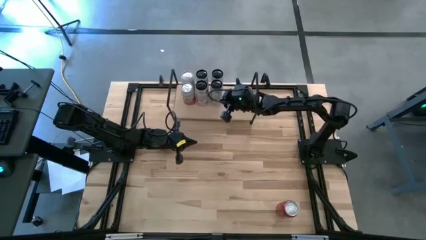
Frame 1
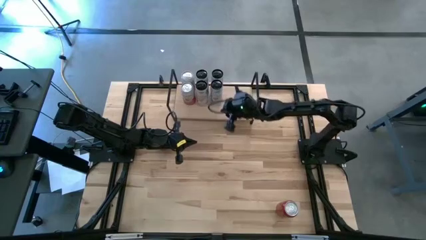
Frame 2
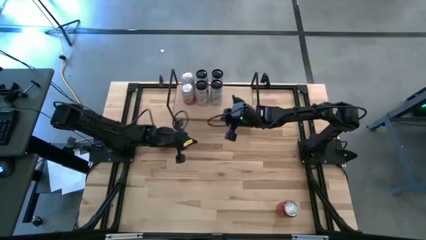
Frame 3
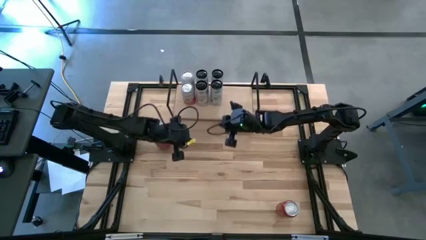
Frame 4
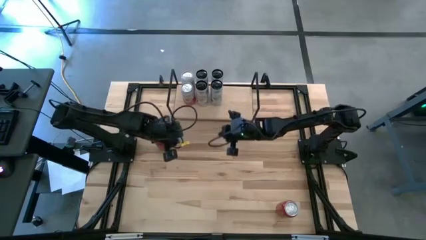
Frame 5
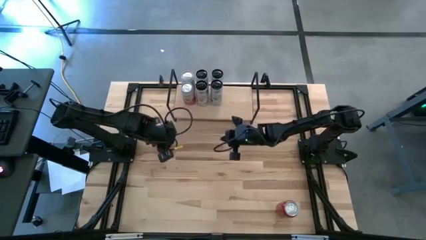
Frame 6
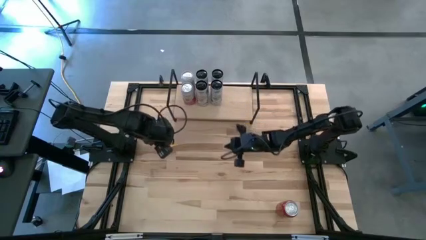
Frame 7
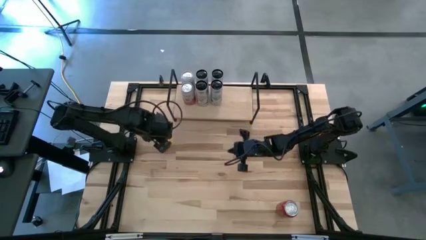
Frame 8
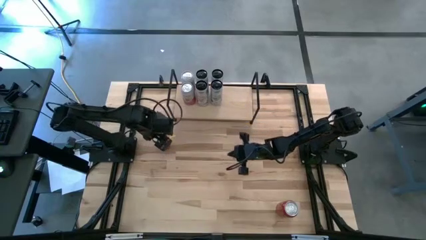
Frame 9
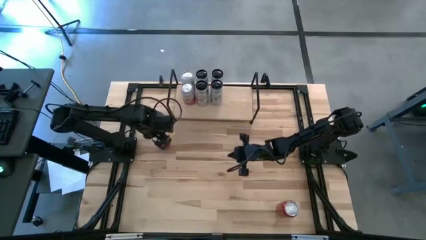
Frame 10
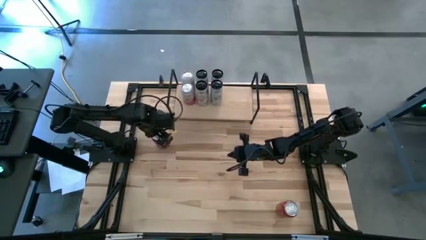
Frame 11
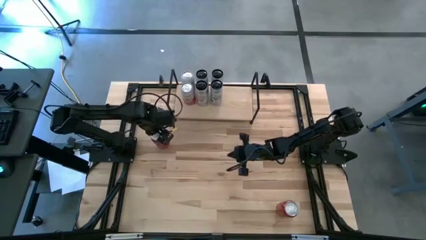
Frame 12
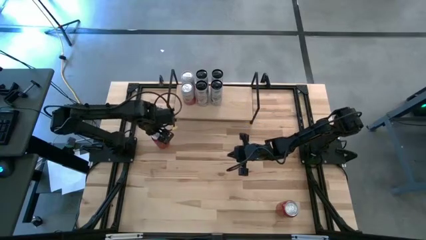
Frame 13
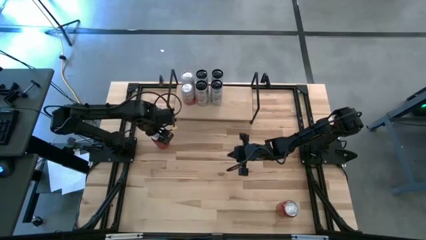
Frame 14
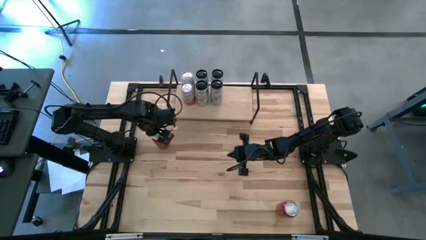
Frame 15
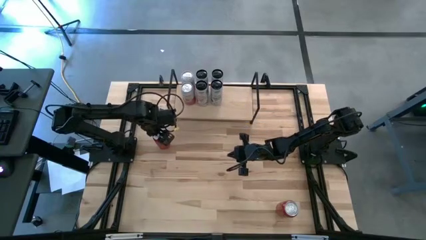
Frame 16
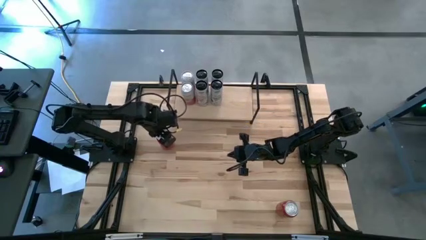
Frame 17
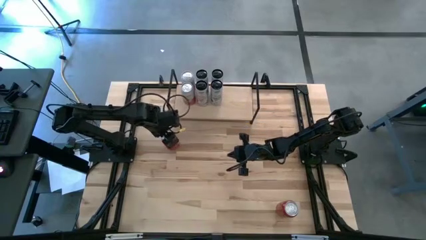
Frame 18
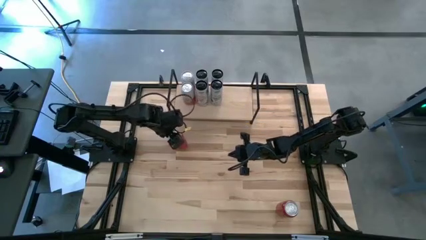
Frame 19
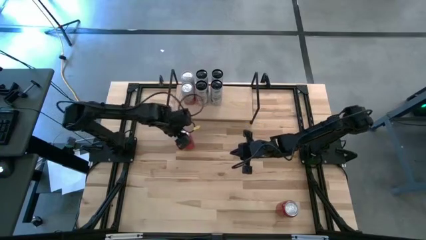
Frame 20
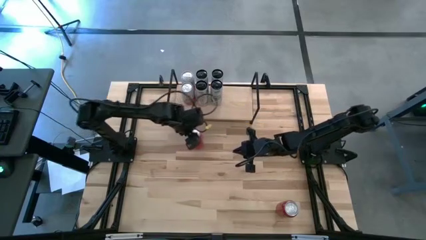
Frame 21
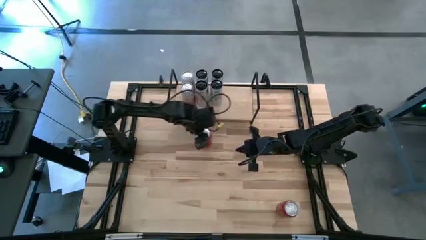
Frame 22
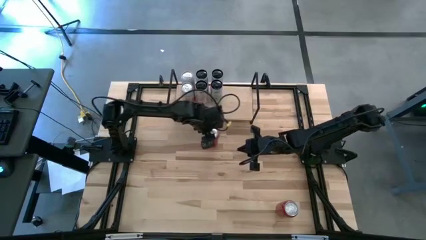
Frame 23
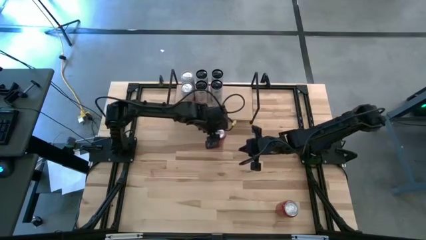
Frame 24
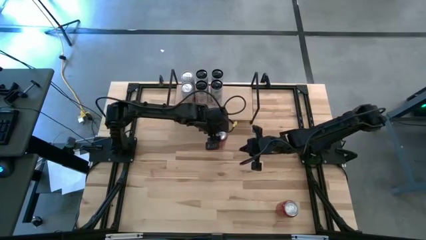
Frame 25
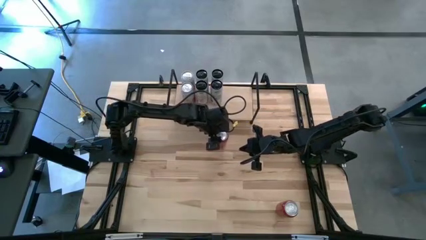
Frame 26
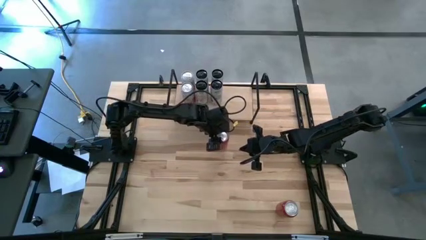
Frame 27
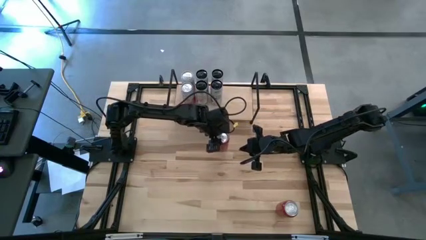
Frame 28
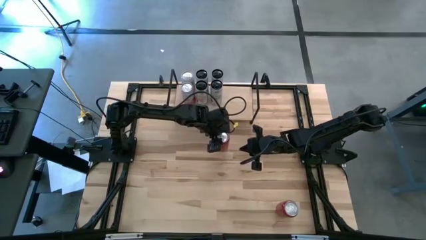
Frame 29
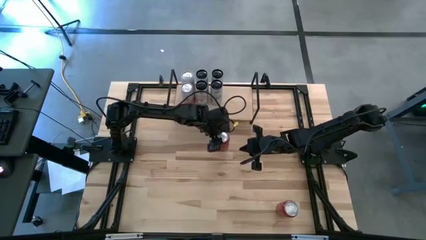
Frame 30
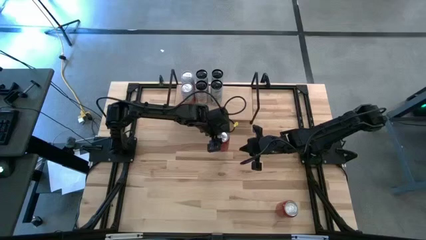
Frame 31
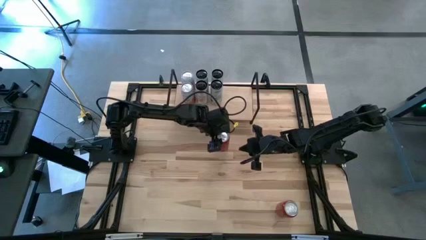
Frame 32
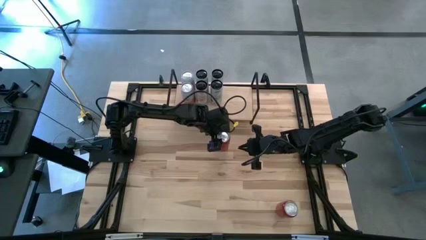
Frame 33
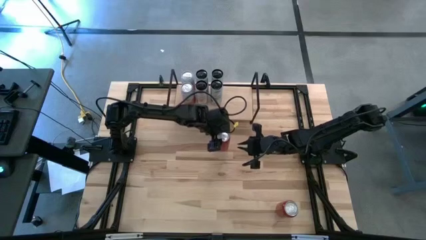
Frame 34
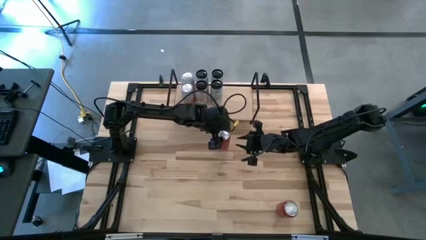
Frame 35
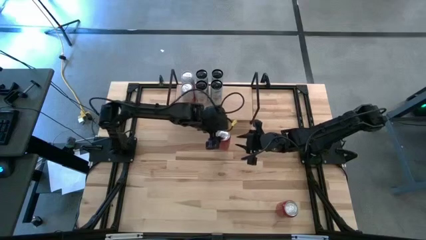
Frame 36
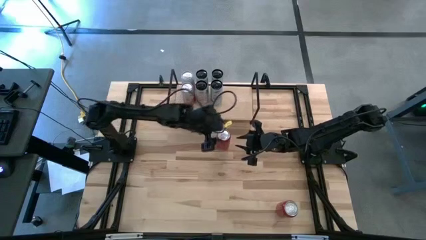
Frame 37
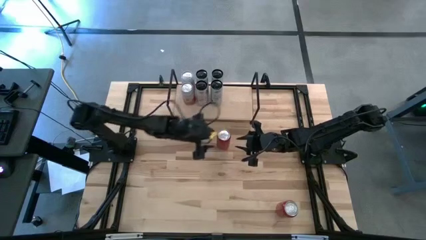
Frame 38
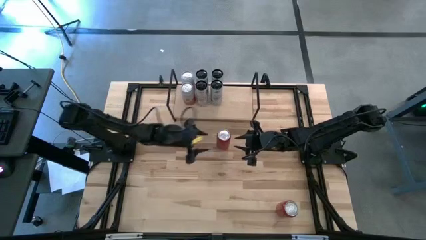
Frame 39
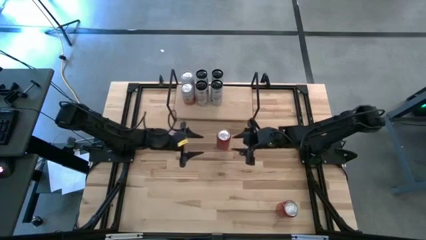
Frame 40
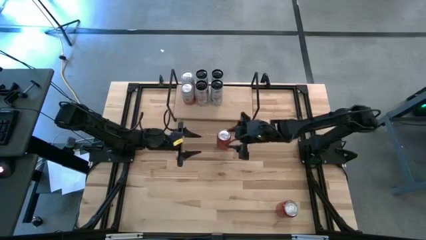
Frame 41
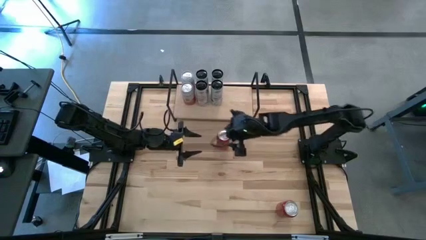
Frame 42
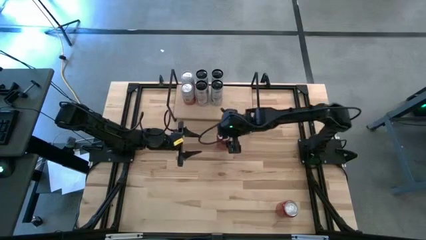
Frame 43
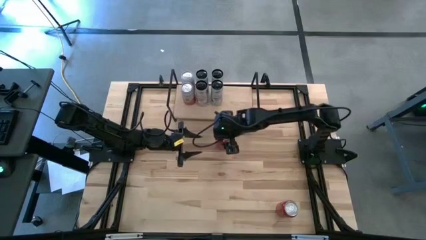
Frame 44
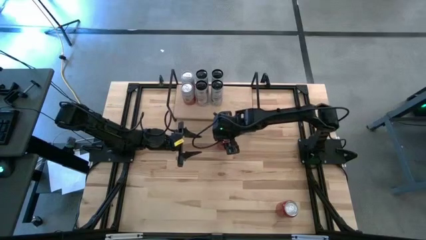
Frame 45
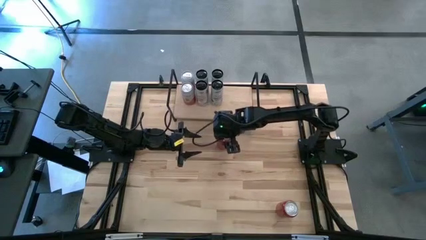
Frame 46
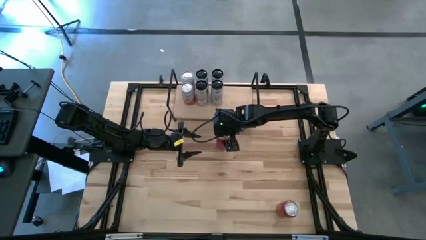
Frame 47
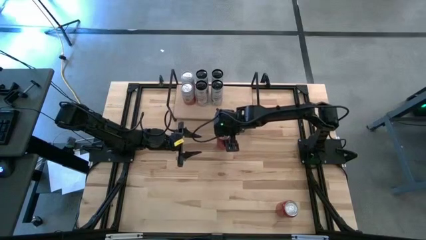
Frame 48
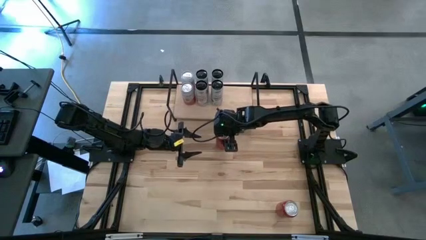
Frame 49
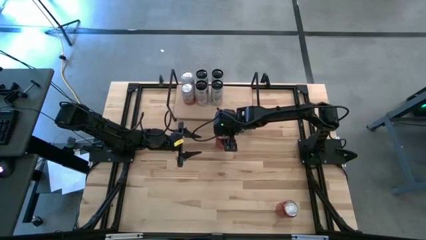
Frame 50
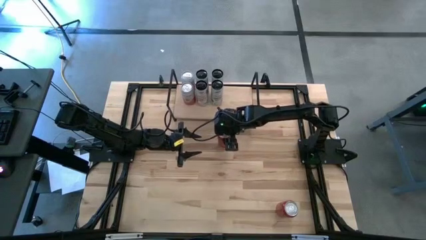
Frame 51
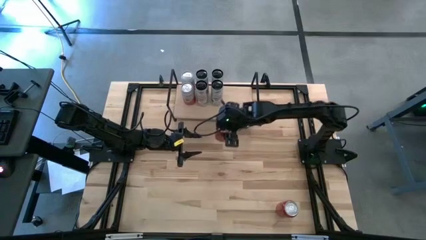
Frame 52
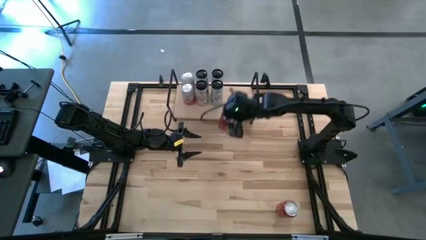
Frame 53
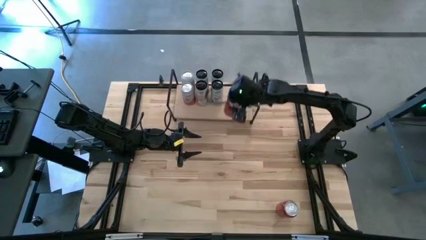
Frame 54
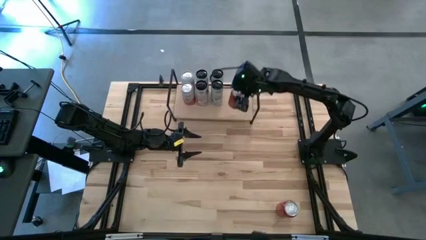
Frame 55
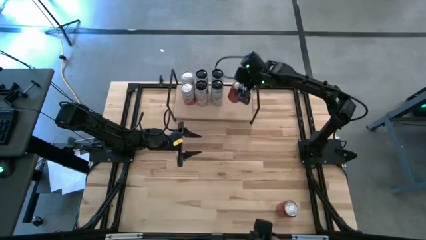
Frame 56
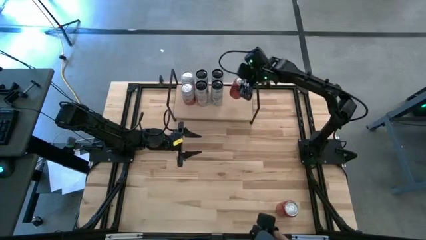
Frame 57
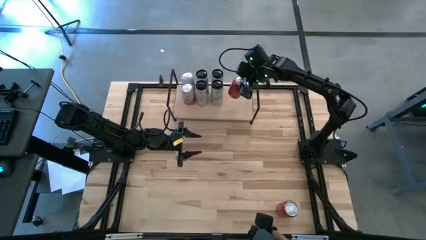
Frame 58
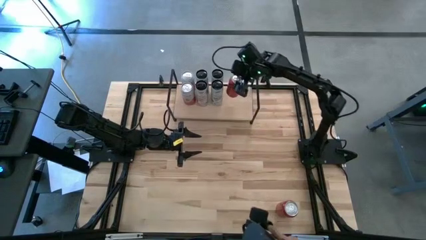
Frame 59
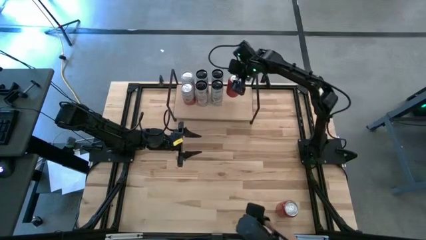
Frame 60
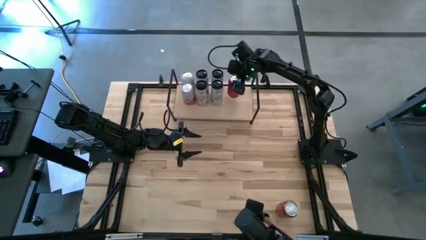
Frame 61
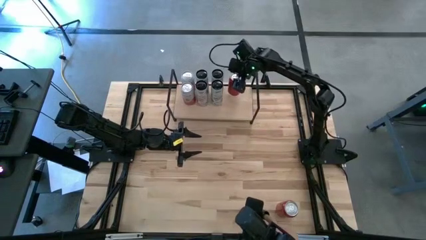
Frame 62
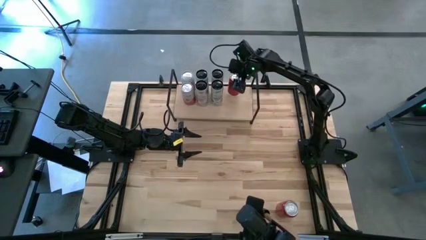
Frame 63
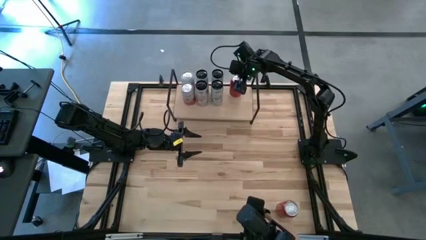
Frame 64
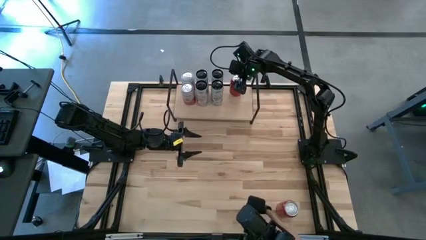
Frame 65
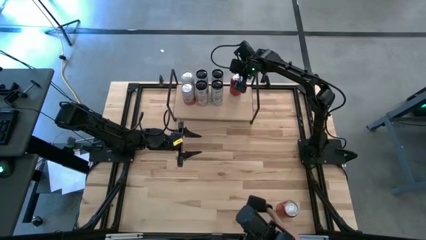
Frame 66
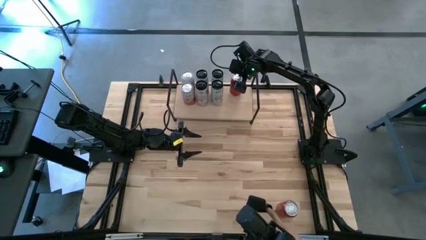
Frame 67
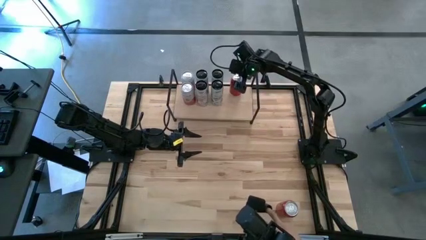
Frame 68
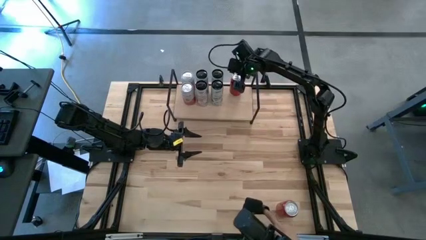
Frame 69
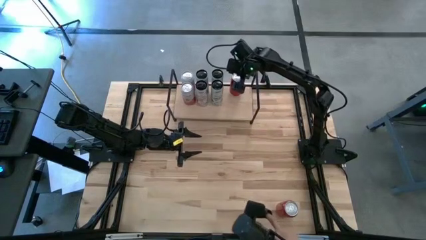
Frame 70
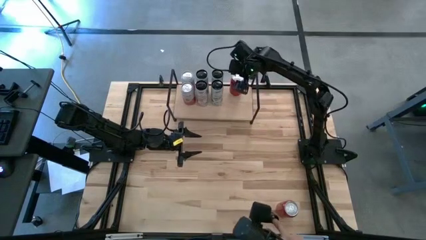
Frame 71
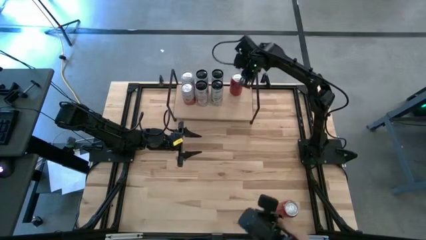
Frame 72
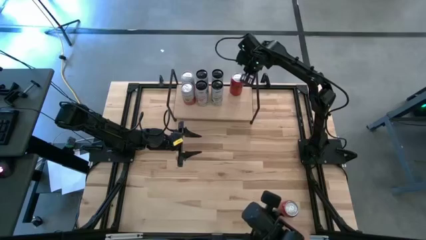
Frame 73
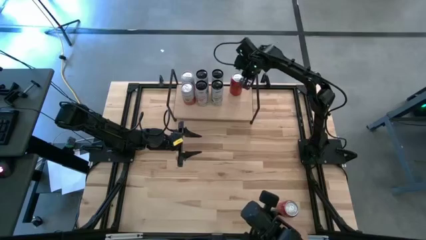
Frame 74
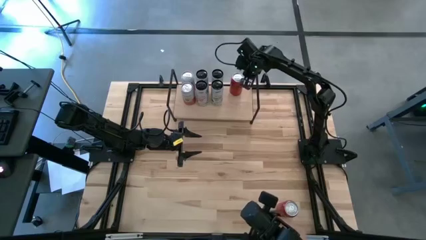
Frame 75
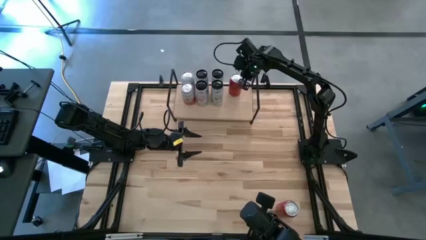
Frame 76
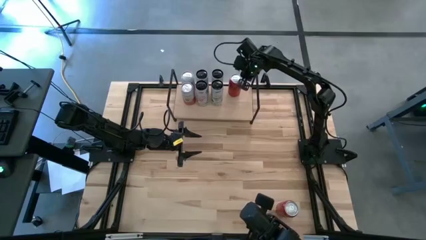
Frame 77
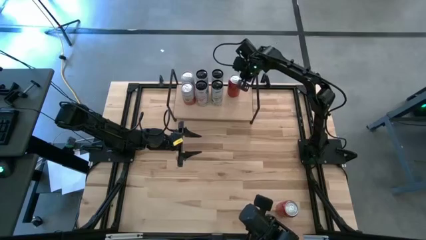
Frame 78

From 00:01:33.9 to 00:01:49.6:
Task: Place canned beverage on shelf
Put the top red soda can on the shelf
